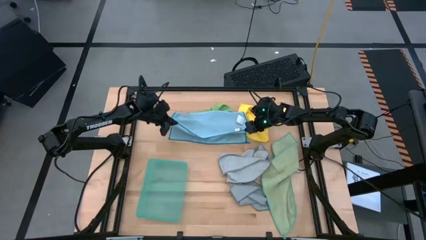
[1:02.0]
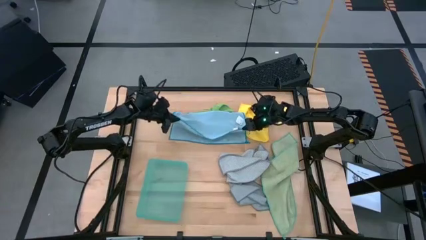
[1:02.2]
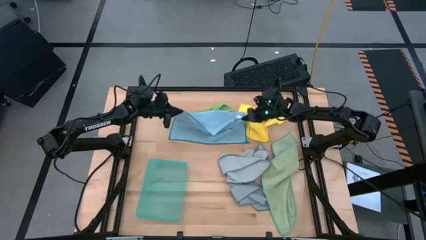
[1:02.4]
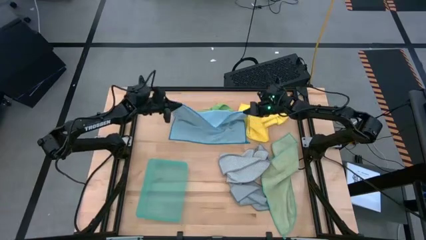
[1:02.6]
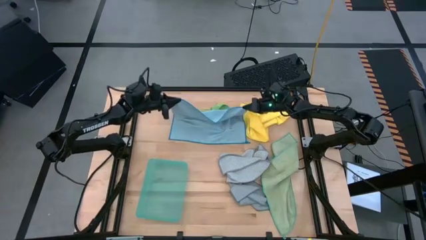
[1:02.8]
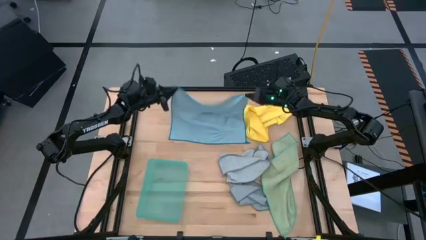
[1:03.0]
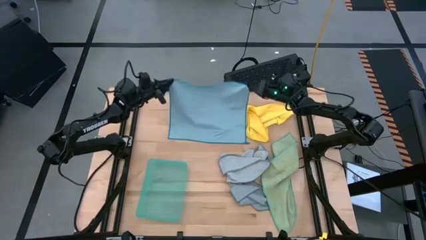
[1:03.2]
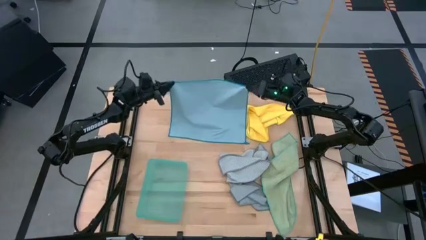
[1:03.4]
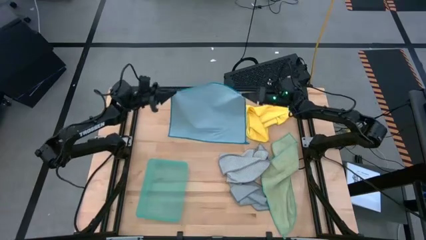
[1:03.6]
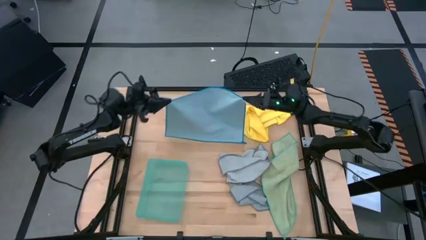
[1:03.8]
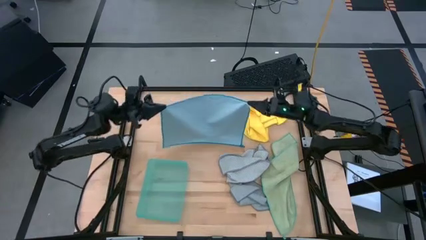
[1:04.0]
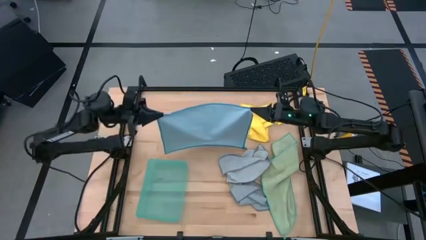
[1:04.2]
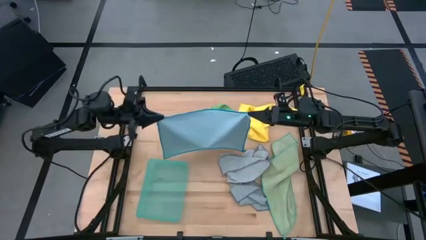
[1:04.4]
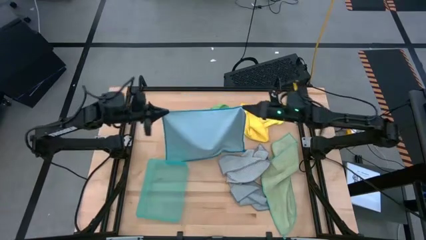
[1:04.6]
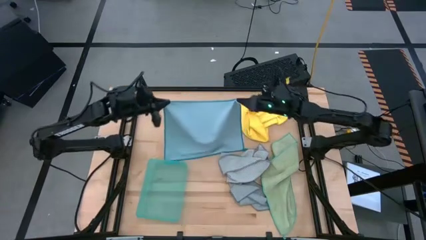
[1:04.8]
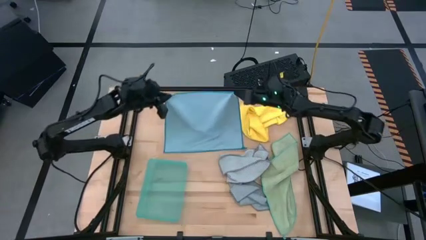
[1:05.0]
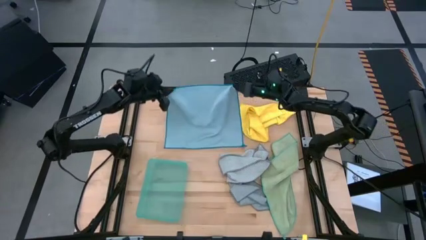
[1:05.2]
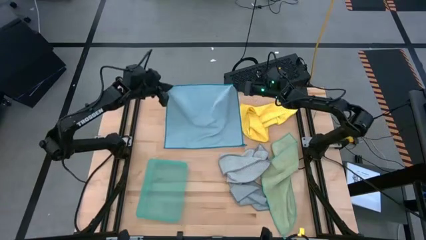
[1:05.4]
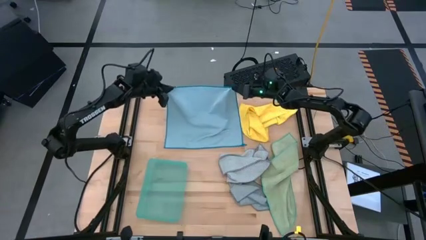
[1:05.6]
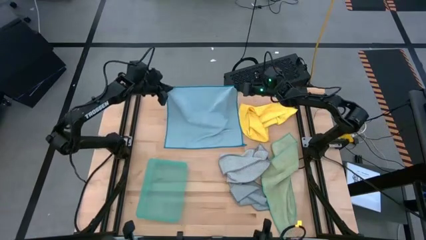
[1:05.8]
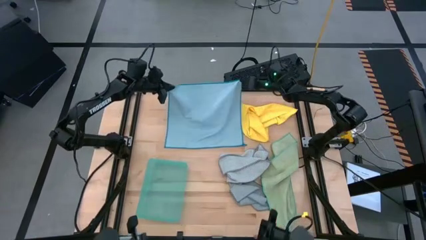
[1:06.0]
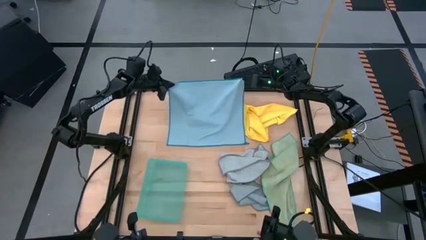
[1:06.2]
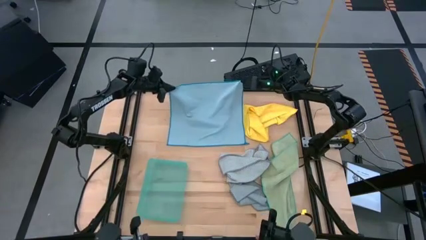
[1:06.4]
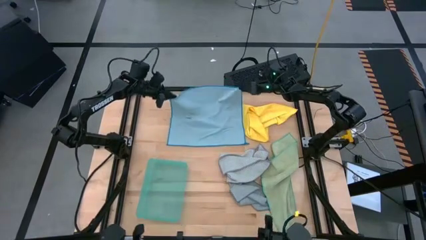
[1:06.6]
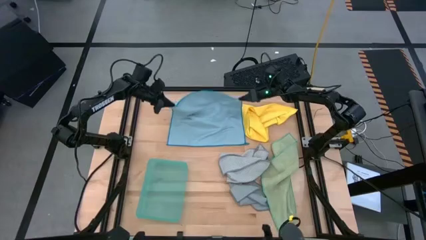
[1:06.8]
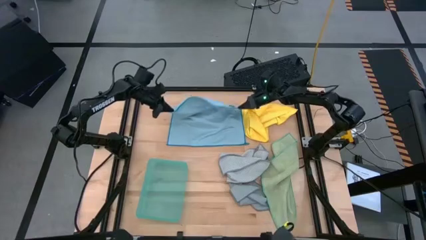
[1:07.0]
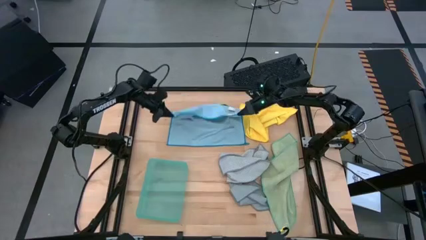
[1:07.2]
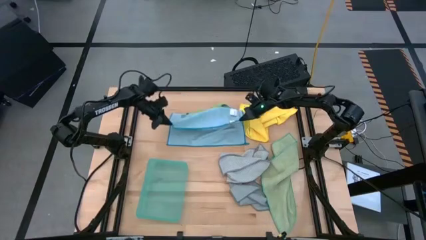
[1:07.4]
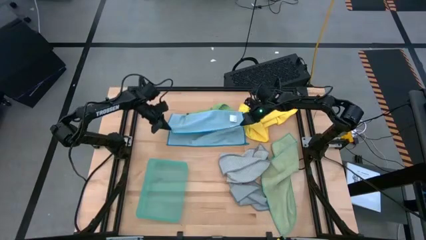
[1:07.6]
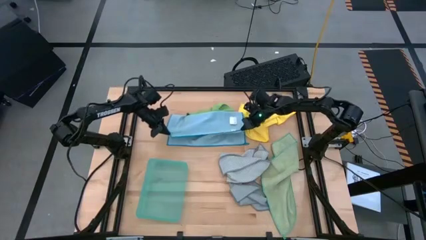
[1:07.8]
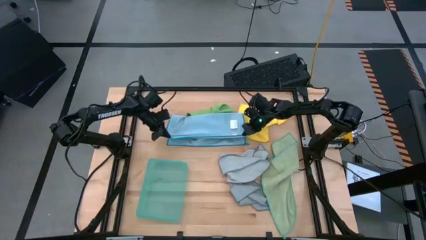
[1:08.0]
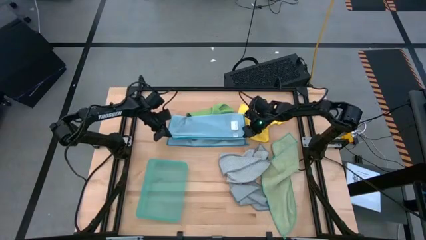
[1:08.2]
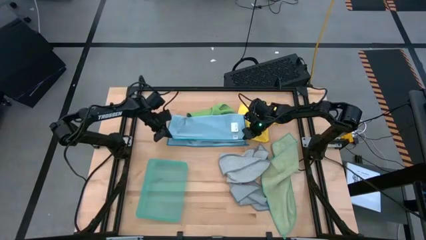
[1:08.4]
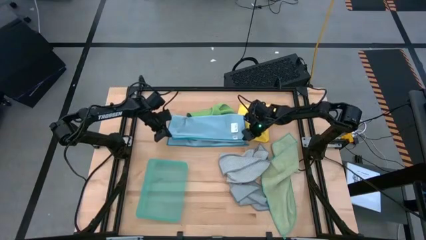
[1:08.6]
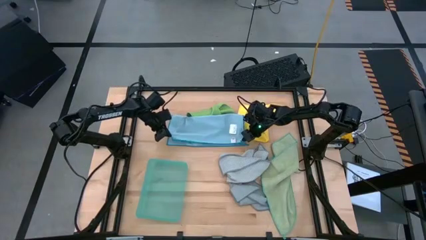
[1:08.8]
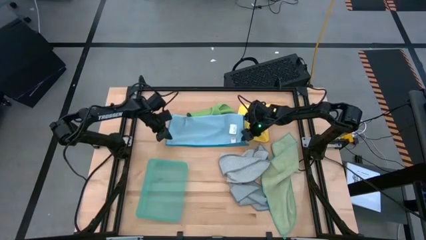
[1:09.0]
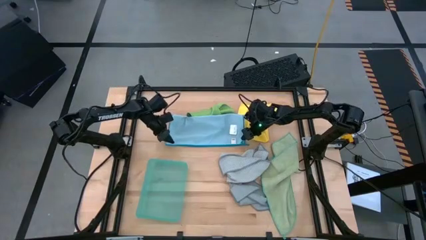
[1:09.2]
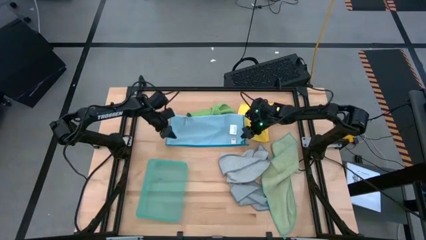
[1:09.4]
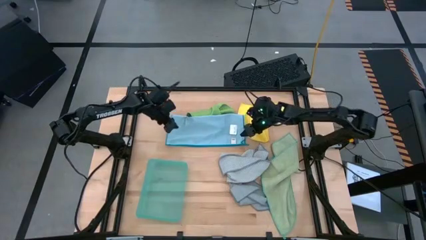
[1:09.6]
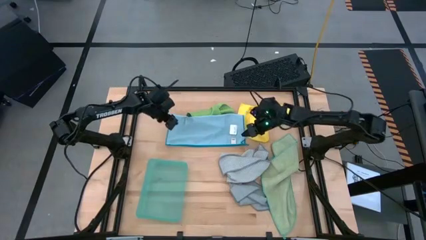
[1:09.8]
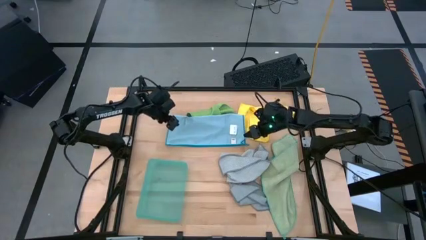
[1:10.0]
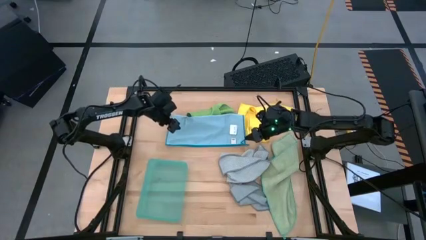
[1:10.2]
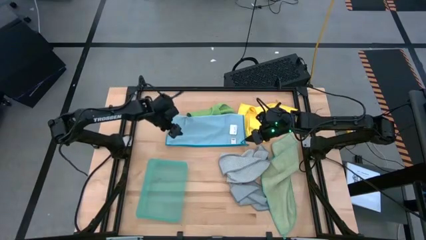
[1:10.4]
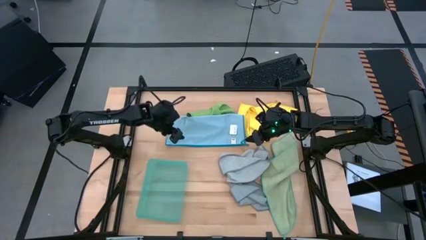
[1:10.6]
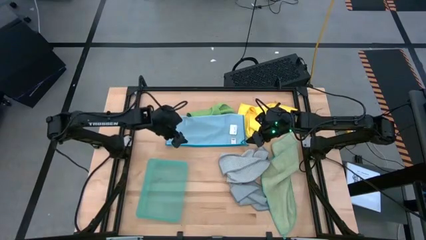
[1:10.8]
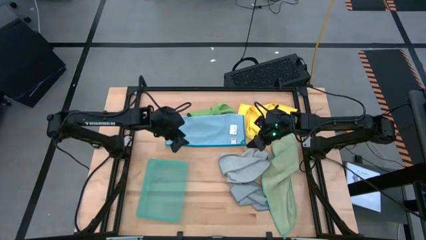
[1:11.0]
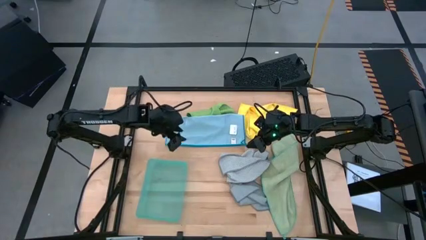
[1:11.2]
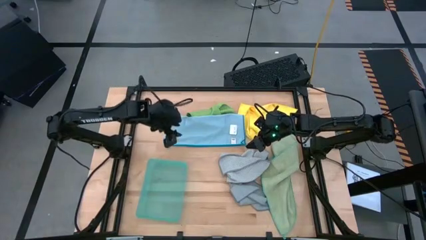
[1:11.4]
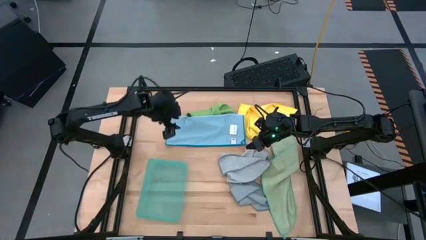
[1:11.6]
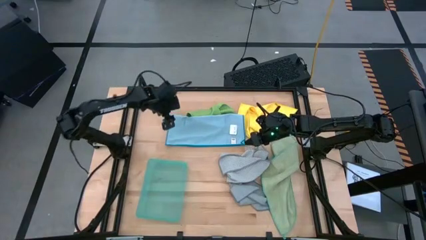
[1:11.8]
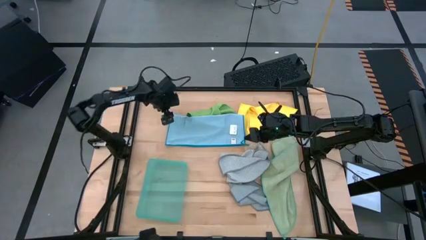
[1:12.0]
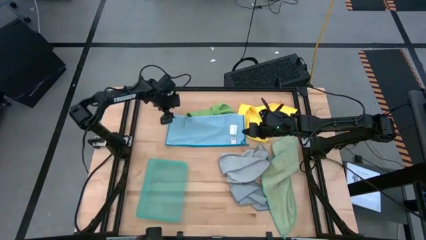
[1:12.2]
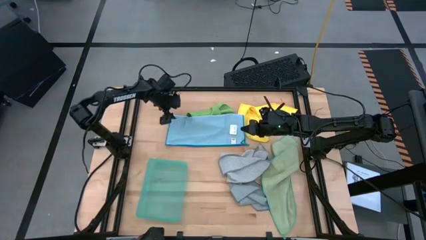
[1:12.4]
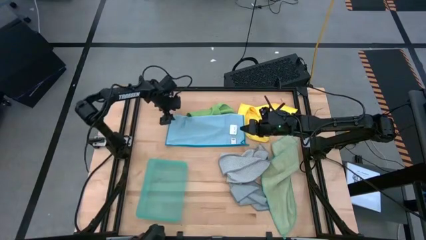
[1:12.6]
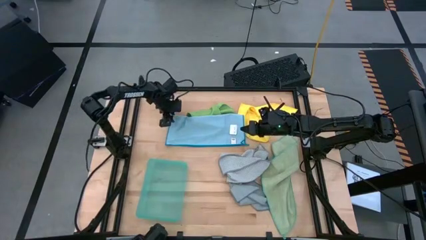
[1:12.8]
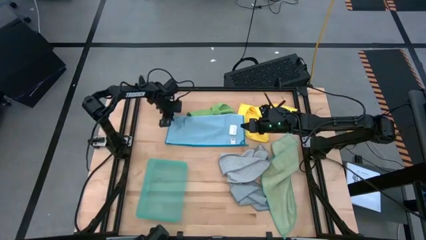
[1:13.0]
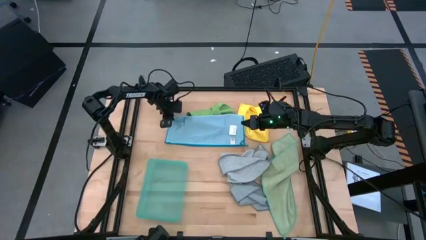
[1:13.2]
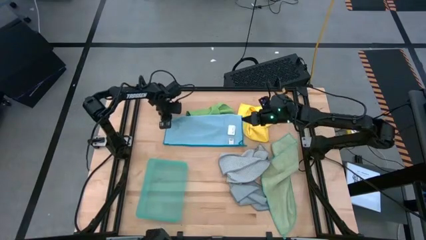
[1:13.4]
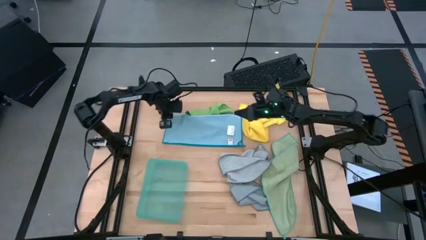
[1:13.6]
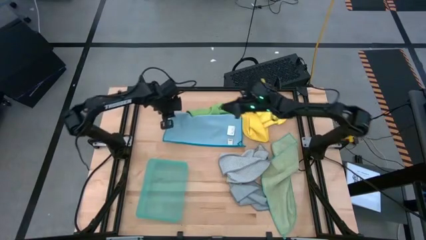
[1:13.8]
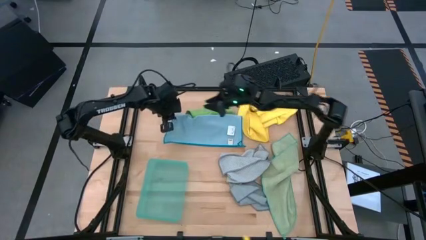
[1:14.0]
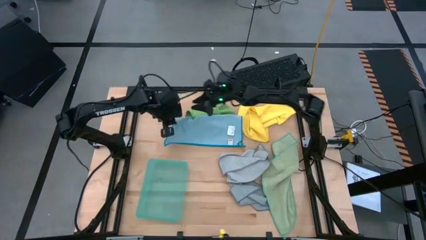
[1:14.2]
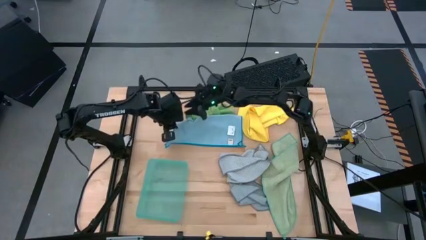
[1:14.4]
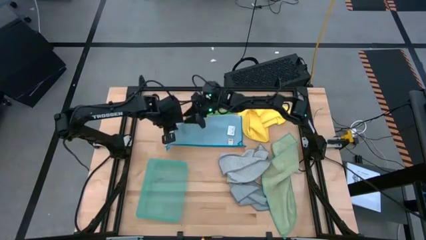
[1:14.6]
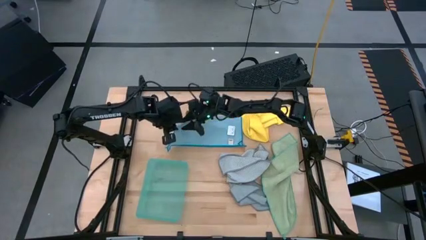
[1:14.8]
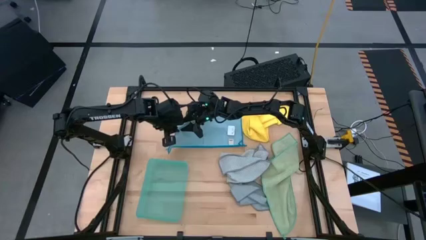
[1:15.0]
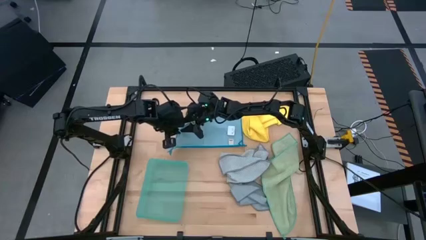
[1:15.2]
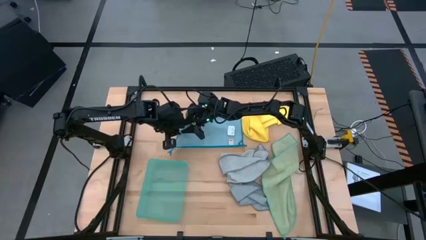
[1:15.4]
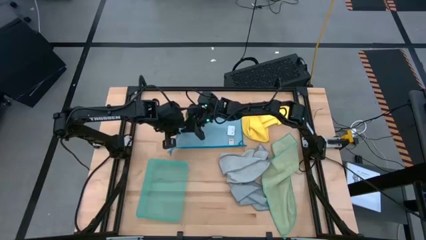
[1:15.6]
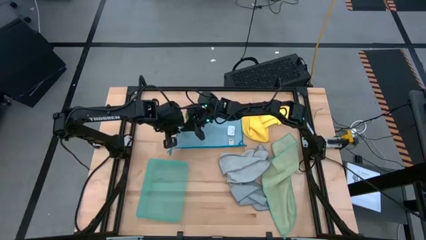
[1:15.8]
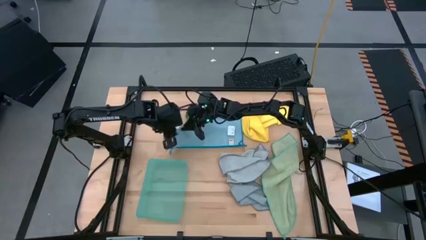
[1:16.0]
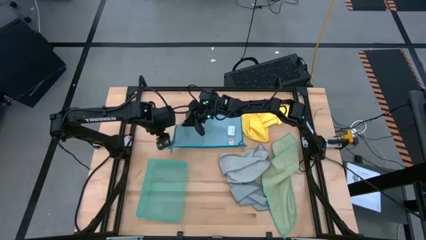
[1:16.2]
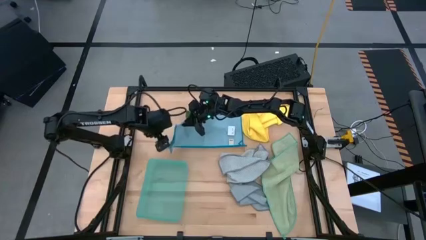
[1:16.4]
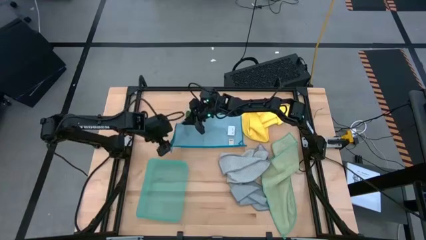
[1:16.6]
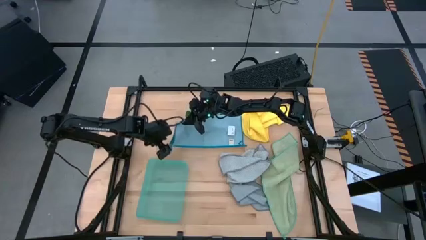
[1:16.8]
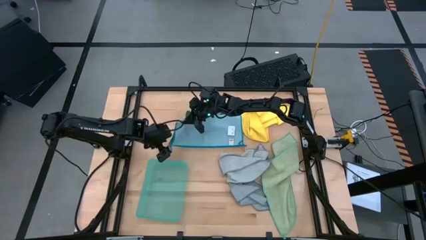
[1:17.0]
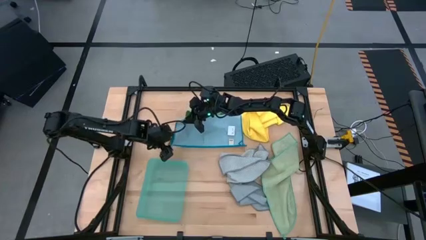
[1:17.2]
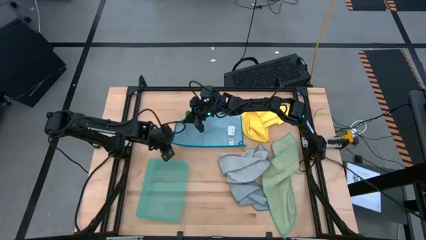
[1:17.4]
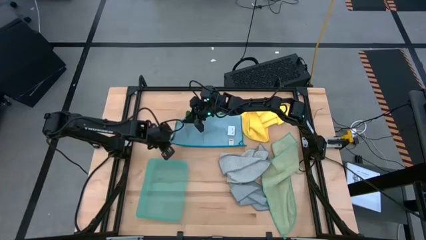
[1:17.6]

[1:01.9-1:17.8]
Task: Fold microfiber towels
Fold the blue microfiber cloth

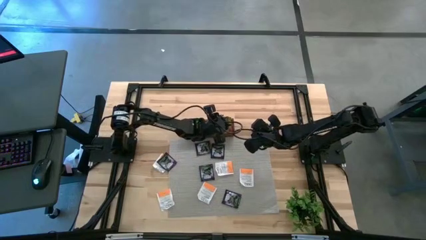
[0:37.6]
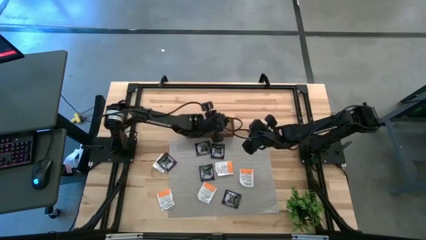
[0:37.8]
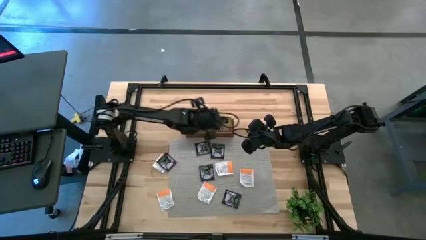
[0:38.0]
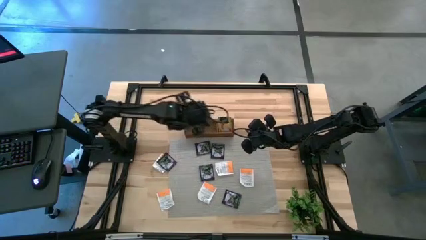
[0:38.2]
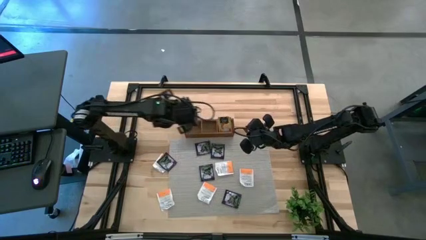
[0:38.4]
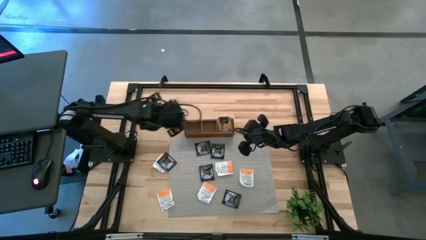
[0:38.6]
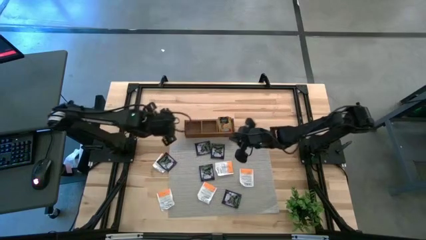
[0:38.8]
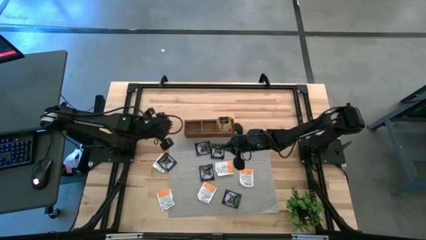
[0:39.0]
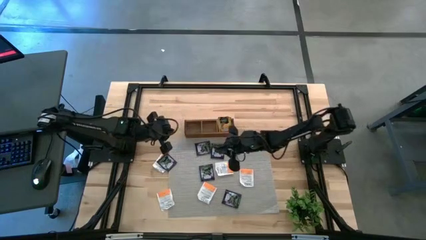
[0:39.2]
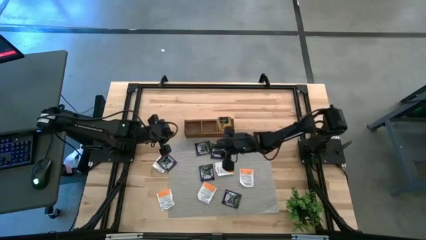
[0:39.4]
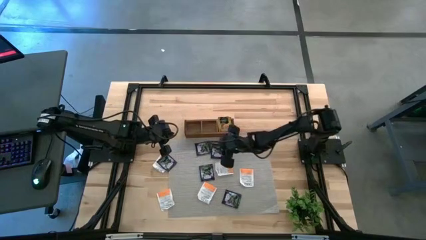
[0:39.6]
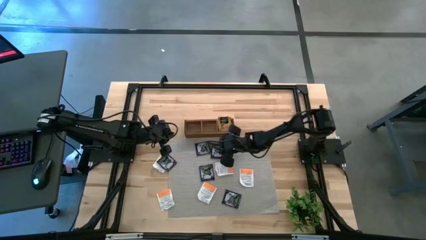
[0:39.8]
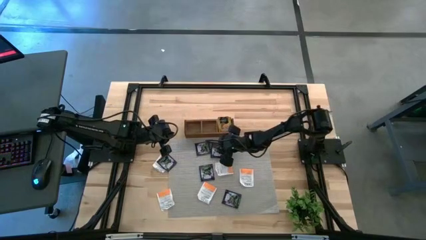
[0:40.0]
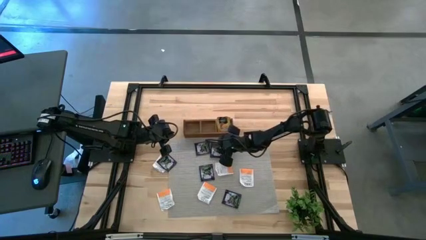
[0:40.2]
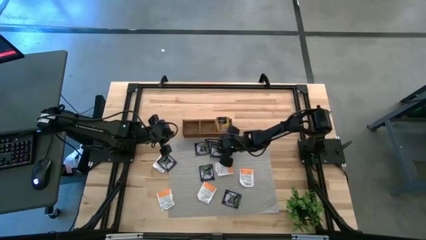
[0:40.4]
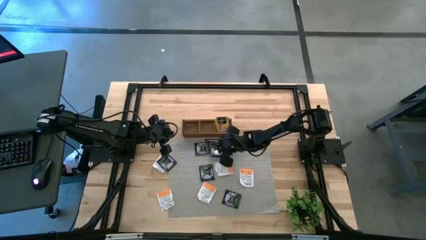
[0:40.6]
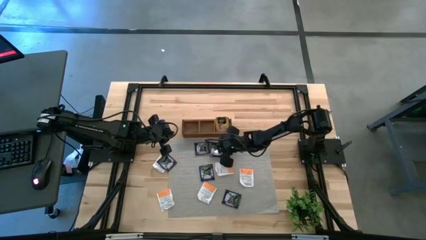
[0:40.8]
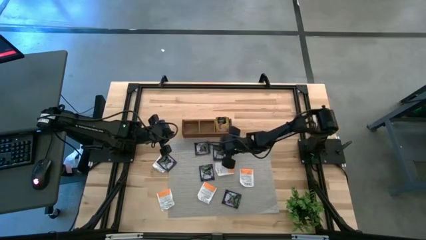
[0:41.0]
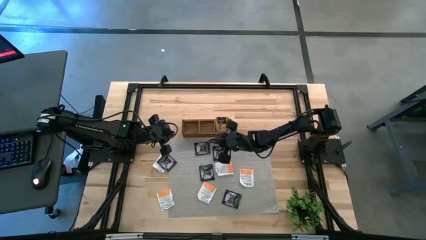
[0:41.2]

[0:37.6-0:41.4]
Task: Pick & Place Tea
Put the violet tea bag into the left section of the wooden organizer
